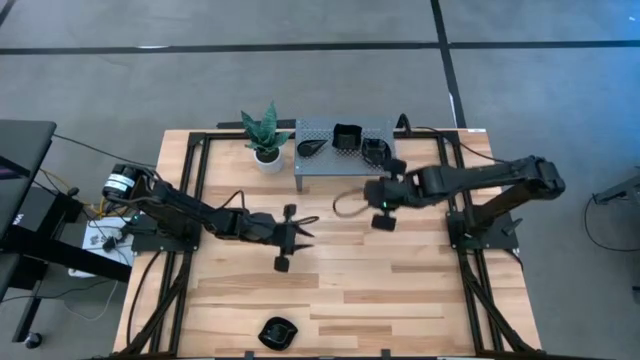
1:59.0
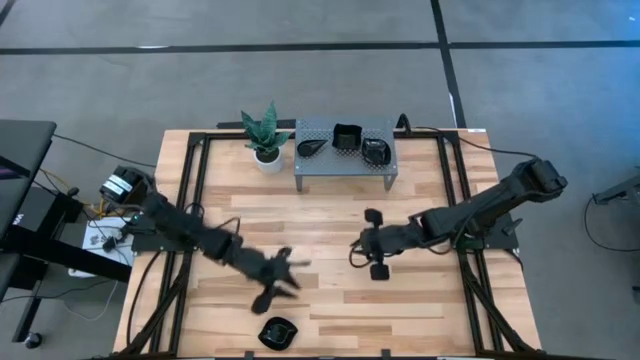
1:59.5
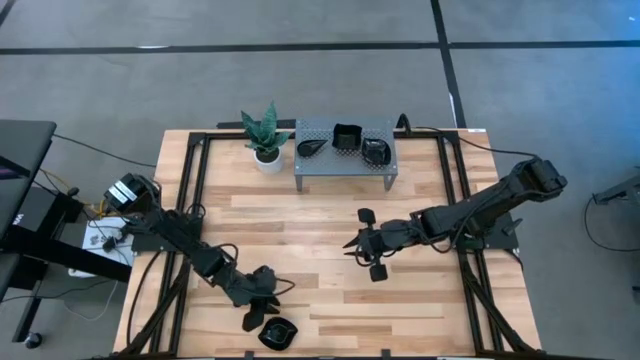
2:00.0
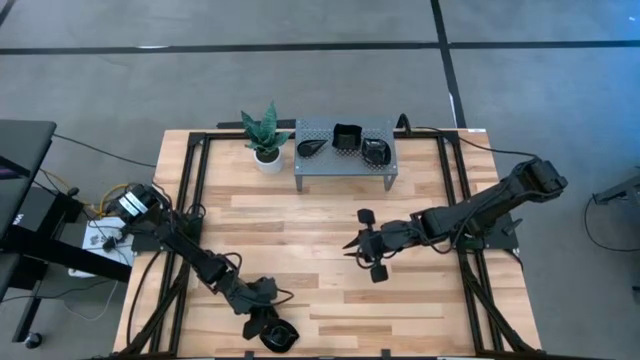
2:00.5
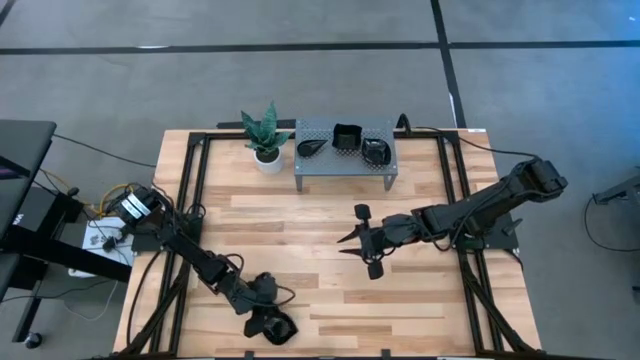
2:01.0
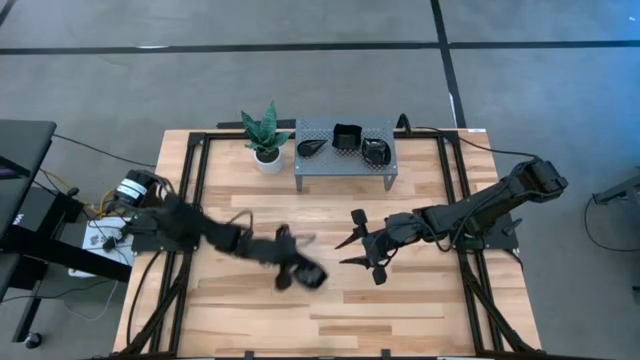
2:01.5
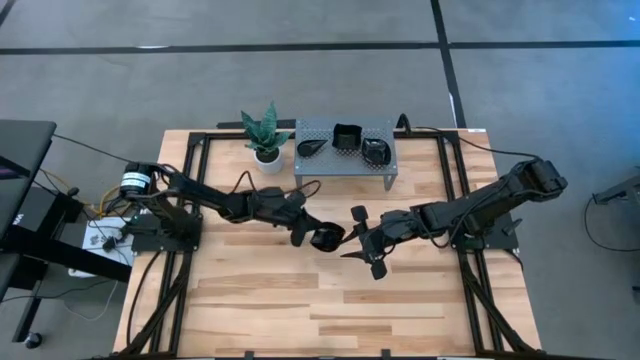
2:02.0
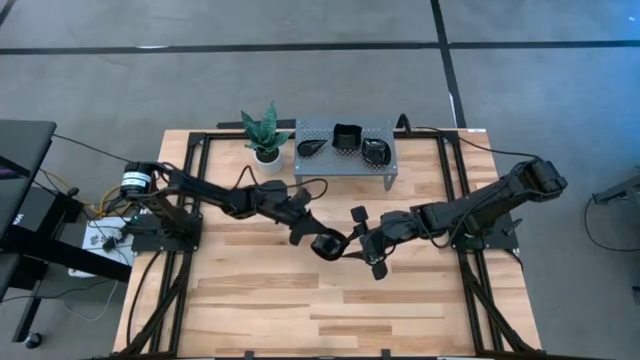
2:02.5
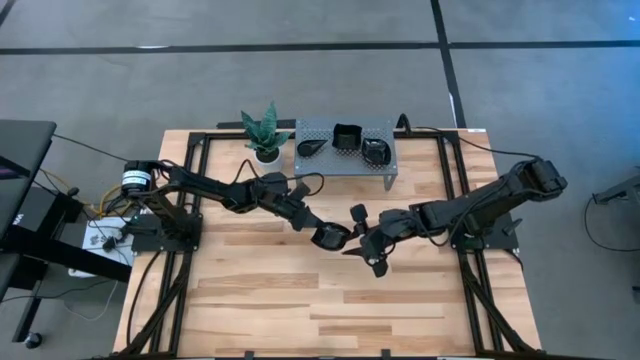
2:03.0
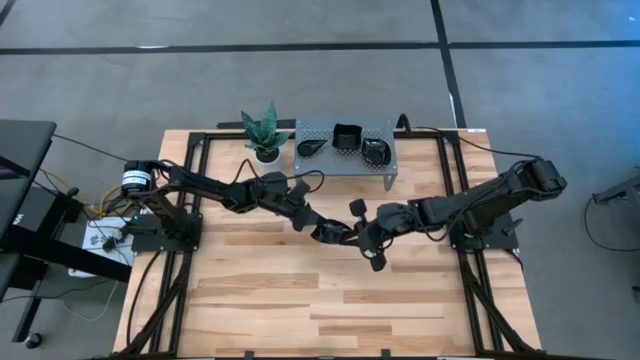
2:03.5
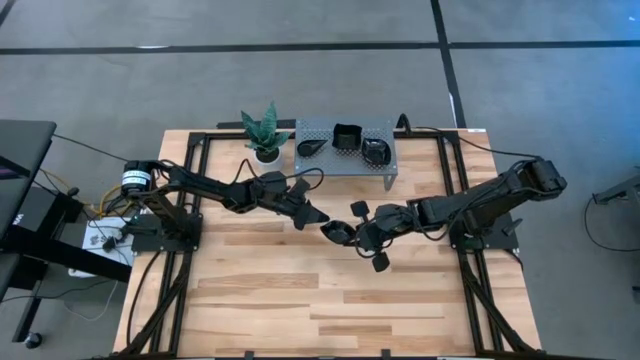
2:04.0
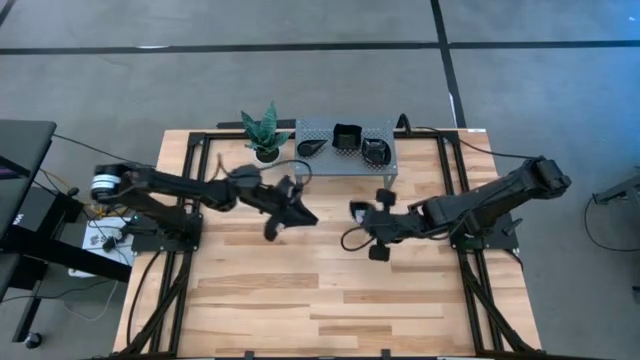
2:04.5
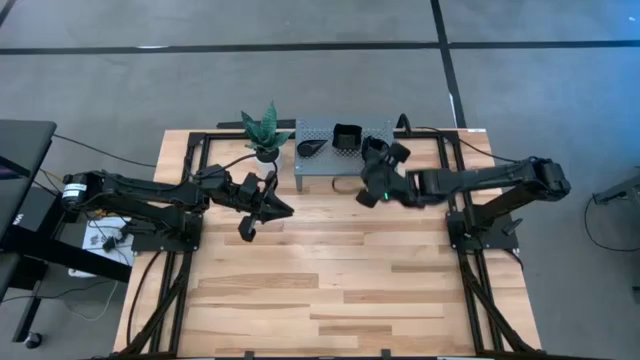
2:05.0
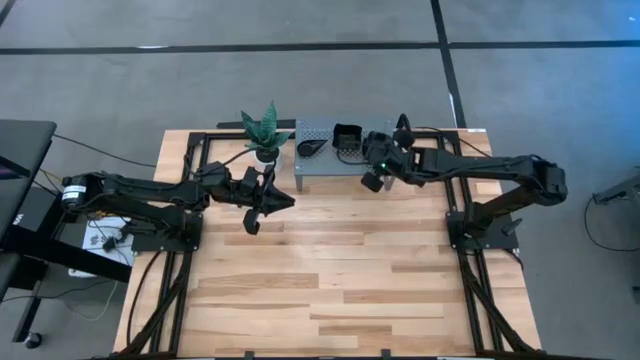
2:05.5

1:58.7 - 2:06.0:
Task: Pick & Place Mini shaped plates
Stack the leaf-shaped plate on top of the leaf-shaped plate on the shelf

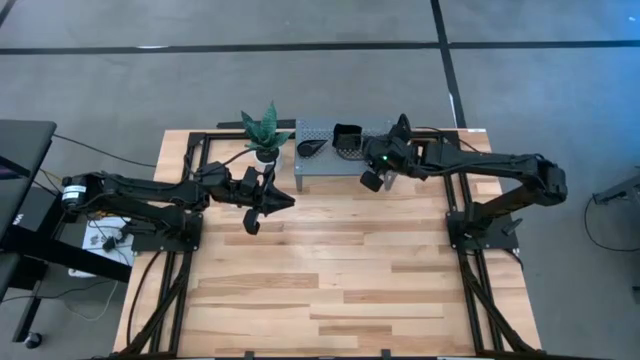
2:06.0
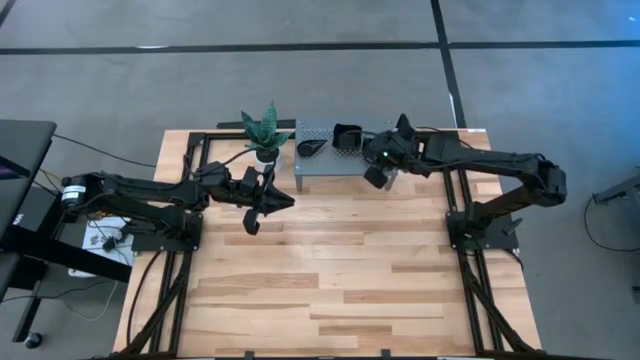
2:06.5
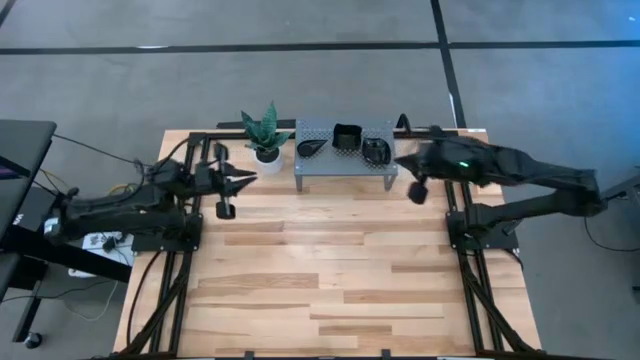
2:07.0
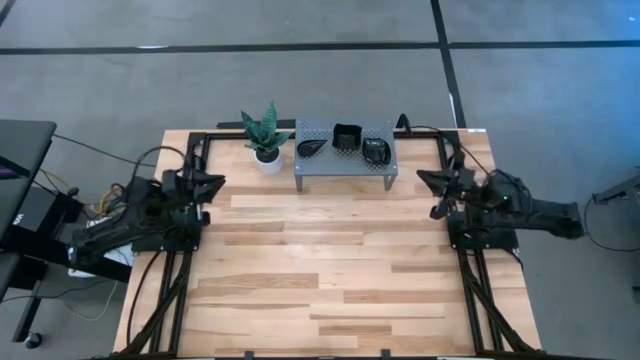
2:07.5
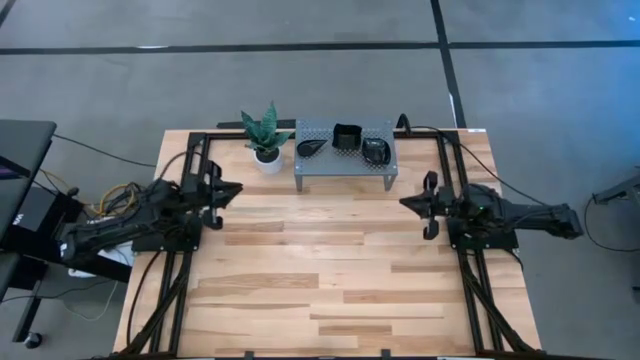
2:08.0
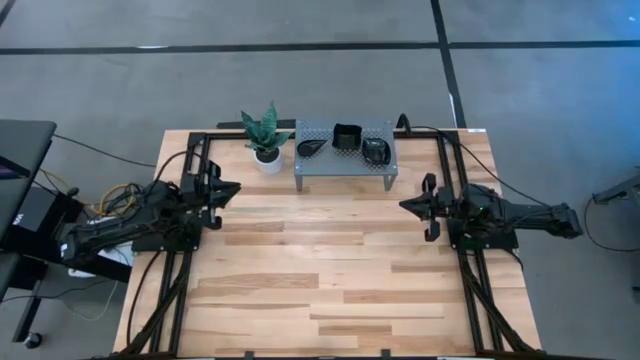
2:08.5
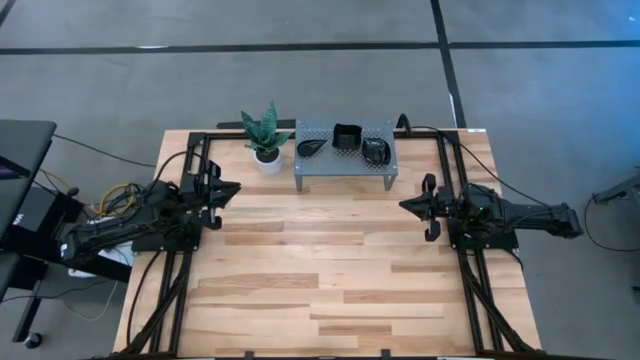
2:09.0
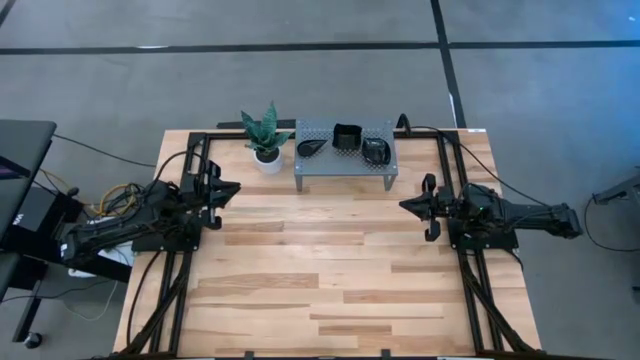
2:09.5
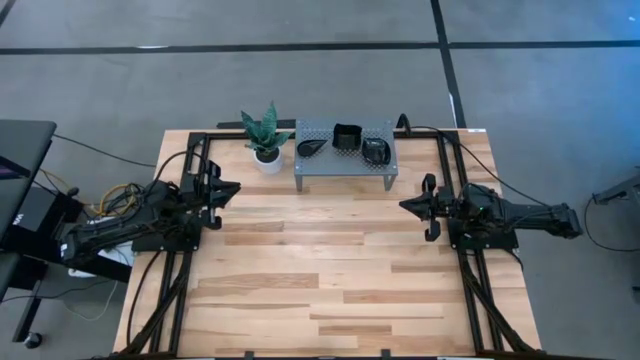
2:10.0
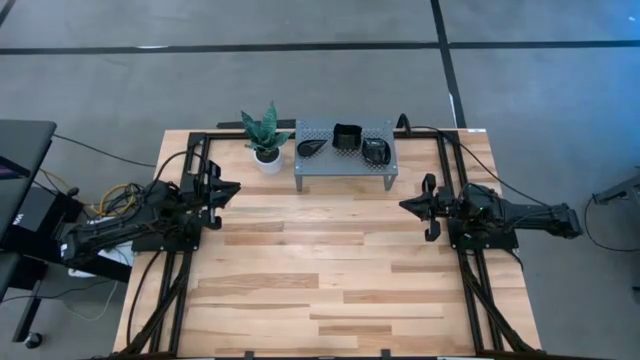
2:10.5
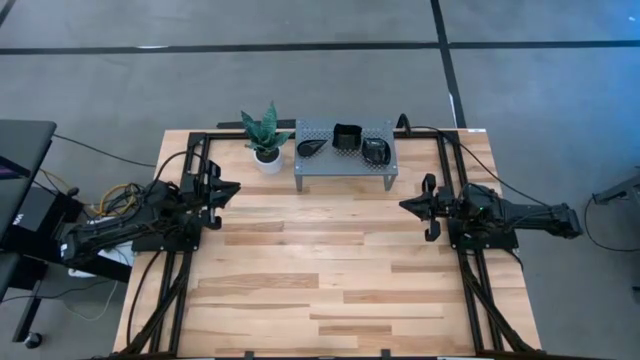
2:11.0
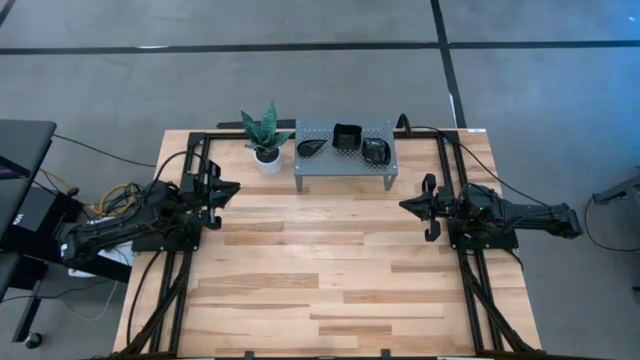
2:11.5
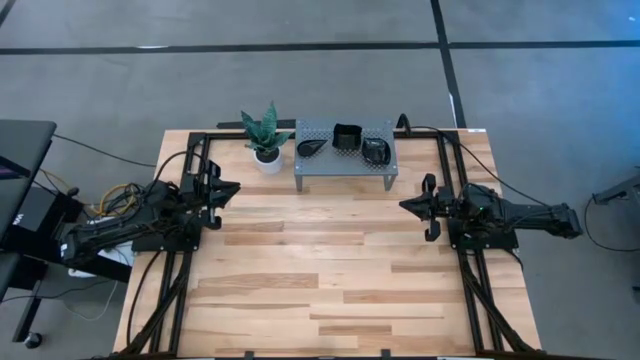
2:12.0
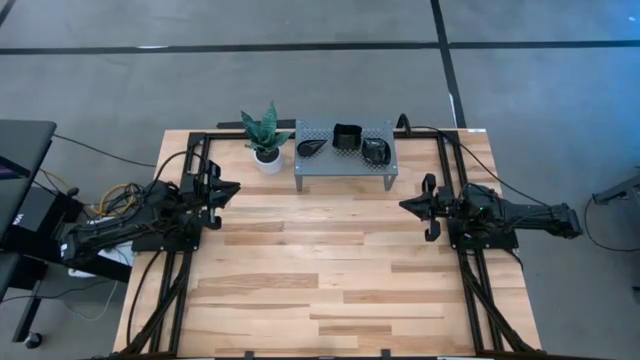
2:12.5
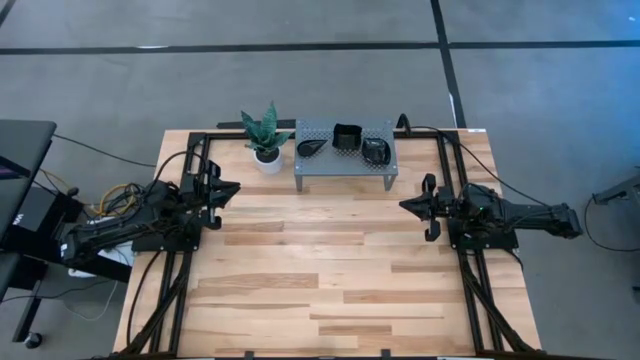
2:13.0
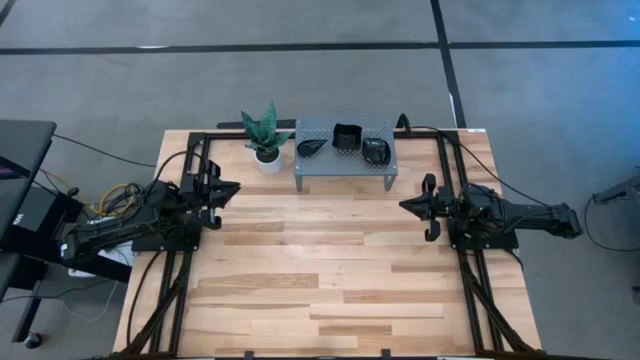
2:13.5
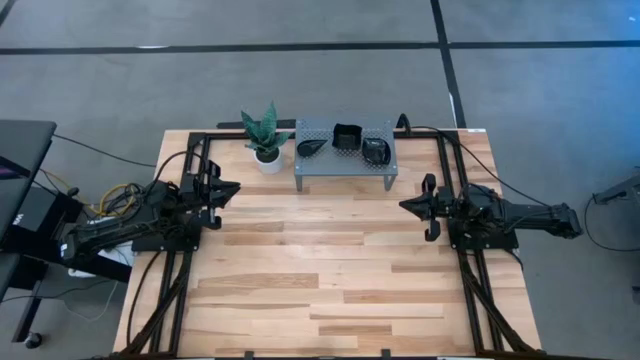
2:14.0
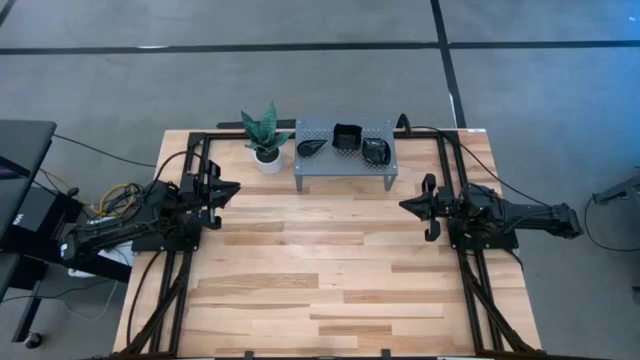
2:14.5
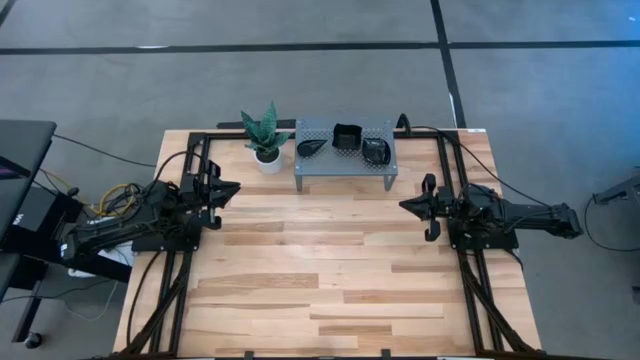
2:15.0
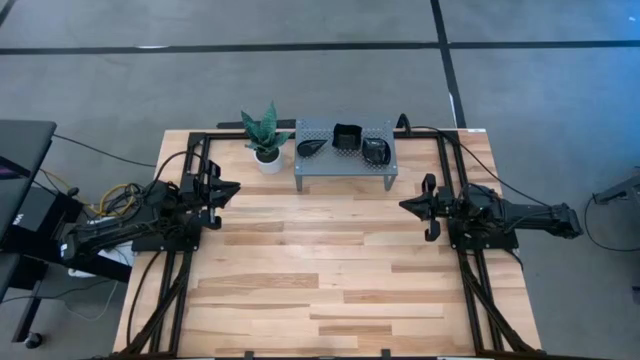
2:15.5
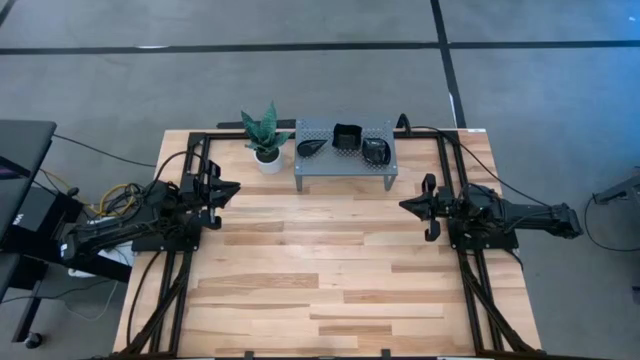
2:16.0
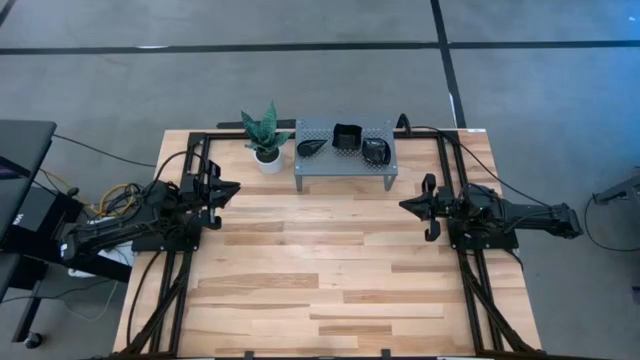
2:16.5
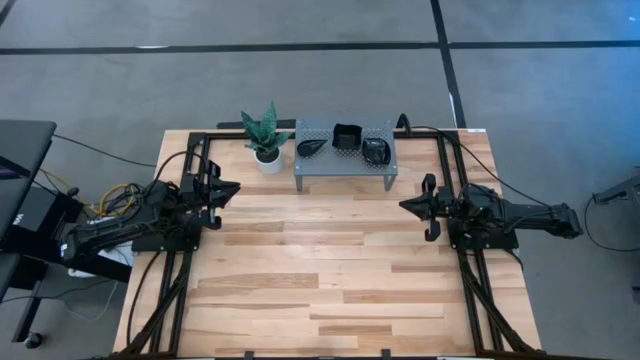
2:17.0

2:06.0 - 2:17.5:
Return to Home Position
